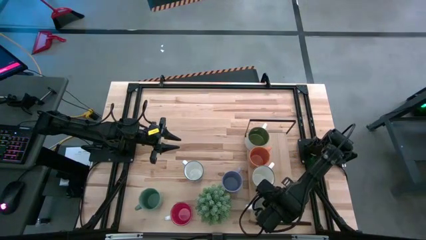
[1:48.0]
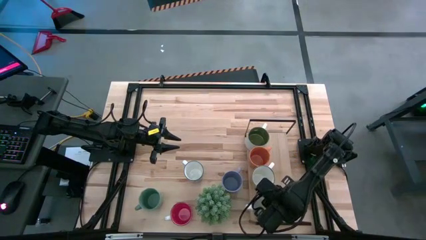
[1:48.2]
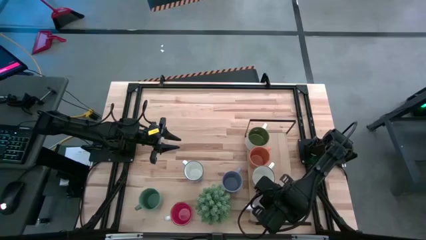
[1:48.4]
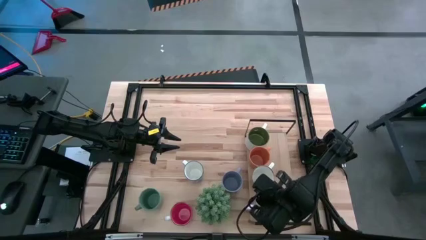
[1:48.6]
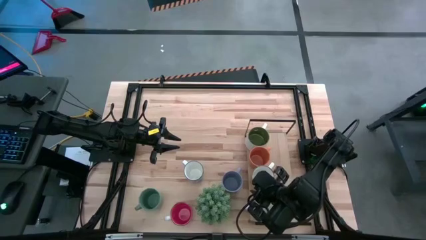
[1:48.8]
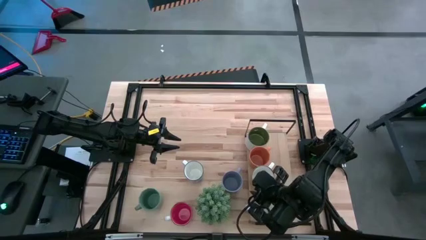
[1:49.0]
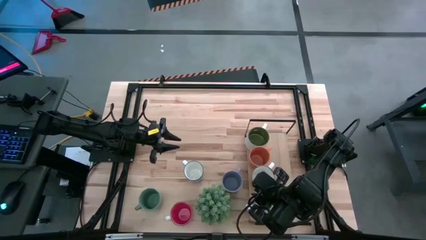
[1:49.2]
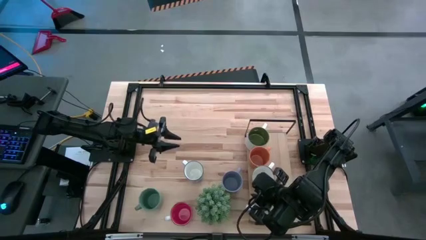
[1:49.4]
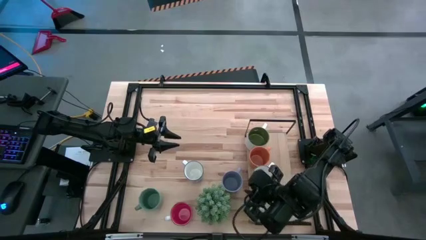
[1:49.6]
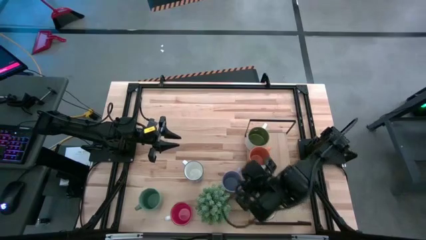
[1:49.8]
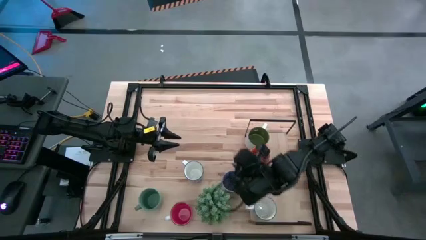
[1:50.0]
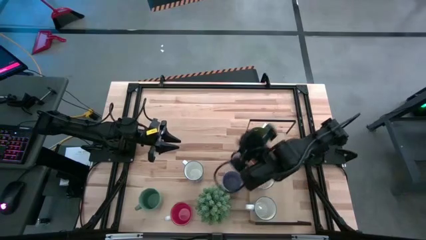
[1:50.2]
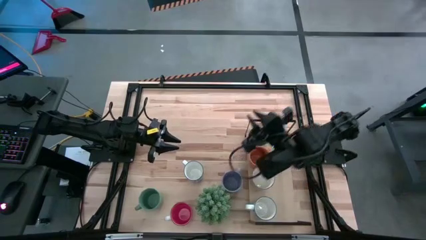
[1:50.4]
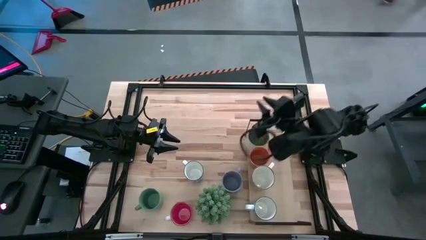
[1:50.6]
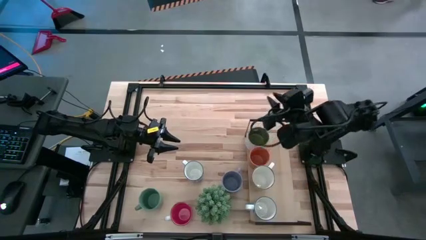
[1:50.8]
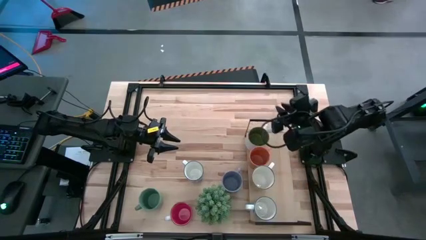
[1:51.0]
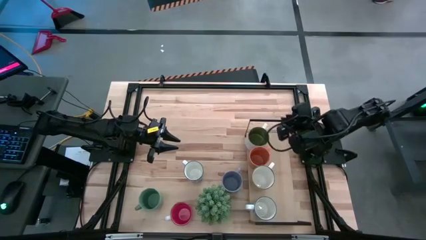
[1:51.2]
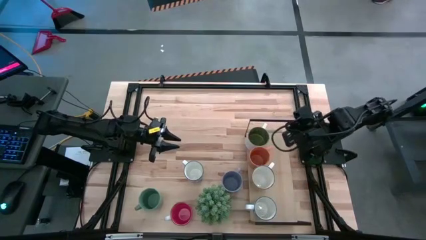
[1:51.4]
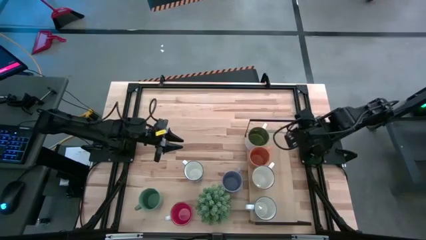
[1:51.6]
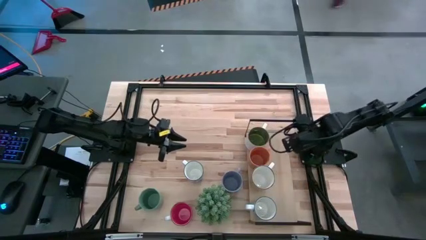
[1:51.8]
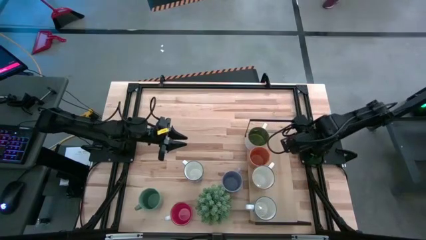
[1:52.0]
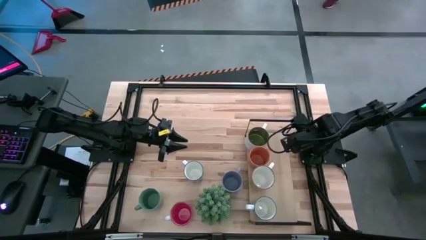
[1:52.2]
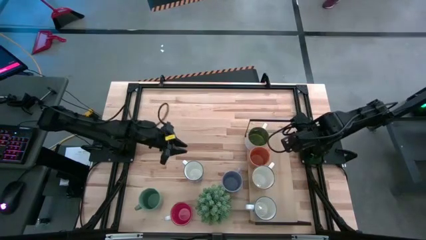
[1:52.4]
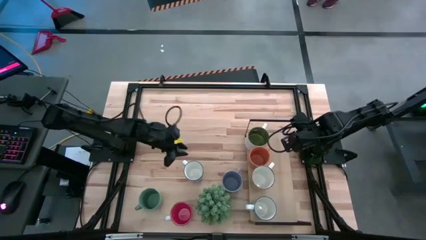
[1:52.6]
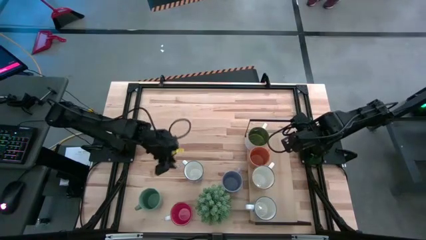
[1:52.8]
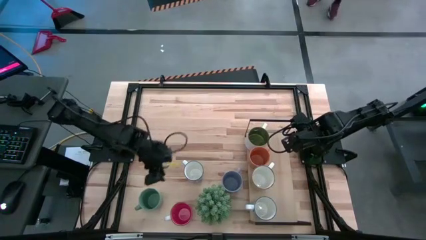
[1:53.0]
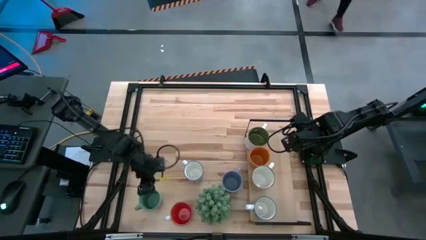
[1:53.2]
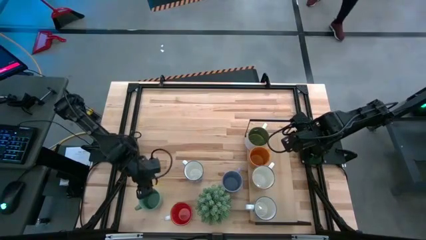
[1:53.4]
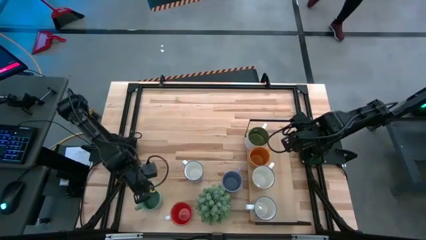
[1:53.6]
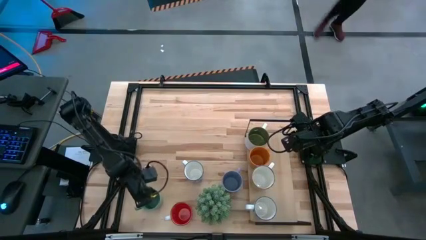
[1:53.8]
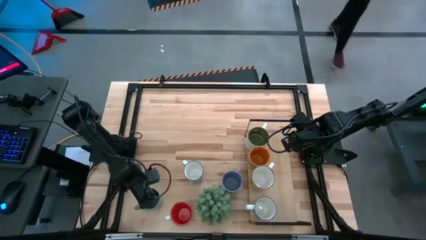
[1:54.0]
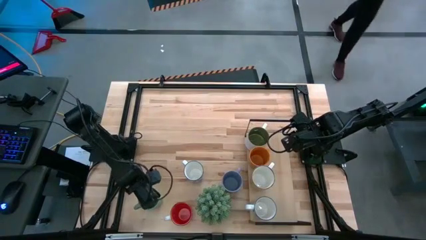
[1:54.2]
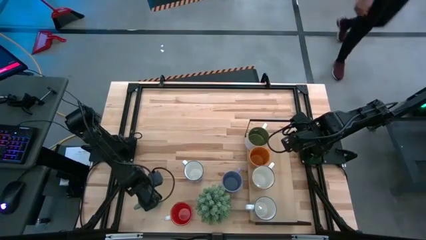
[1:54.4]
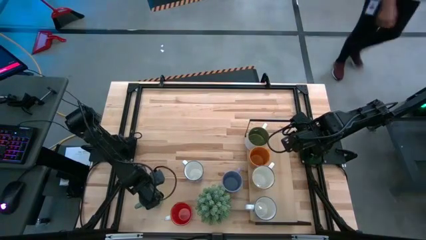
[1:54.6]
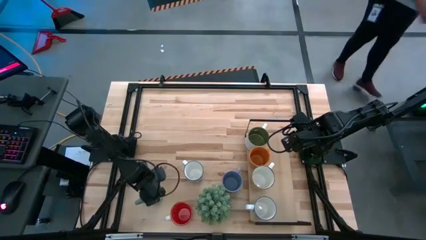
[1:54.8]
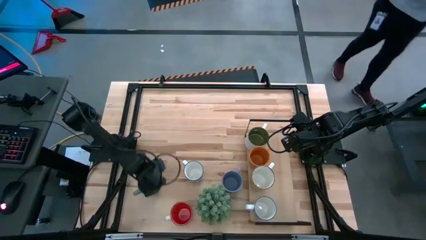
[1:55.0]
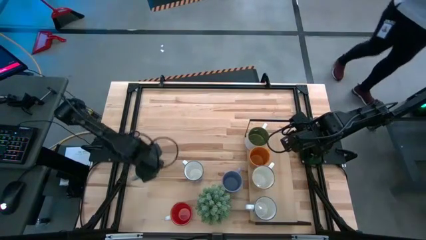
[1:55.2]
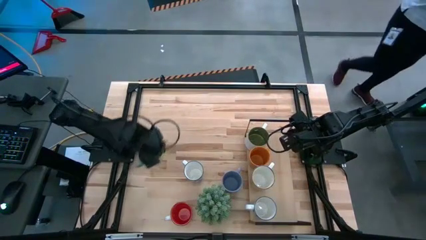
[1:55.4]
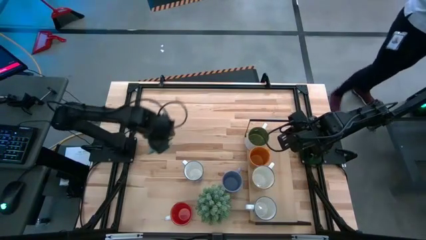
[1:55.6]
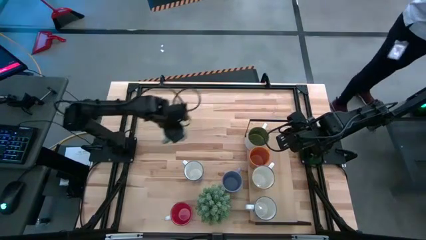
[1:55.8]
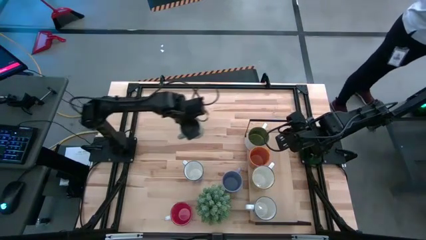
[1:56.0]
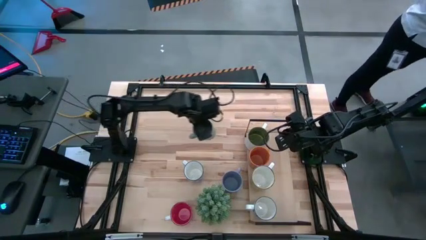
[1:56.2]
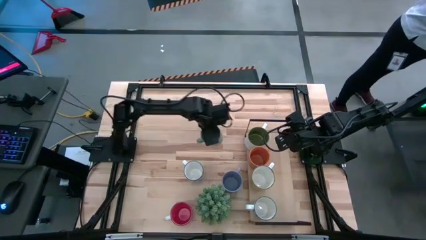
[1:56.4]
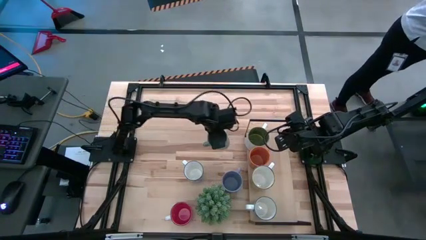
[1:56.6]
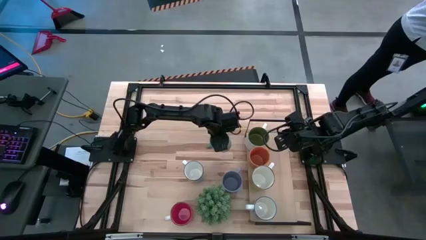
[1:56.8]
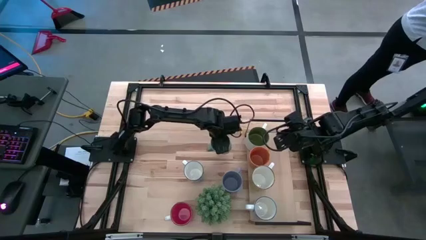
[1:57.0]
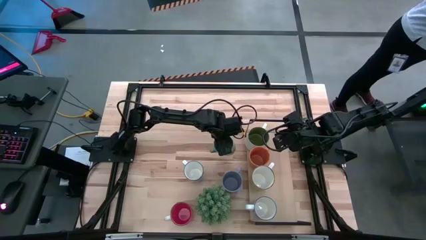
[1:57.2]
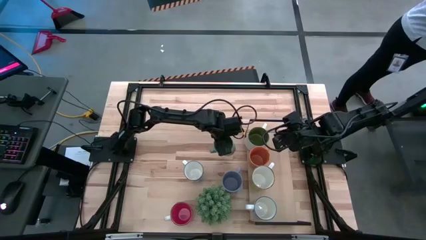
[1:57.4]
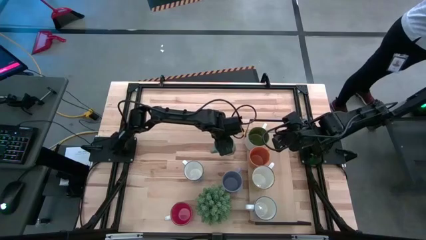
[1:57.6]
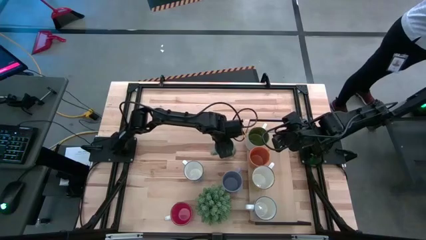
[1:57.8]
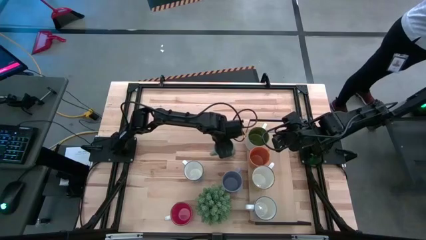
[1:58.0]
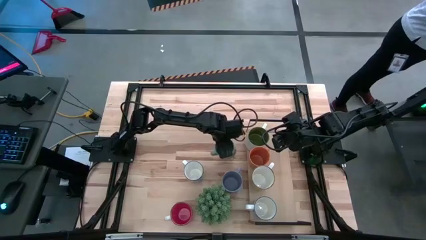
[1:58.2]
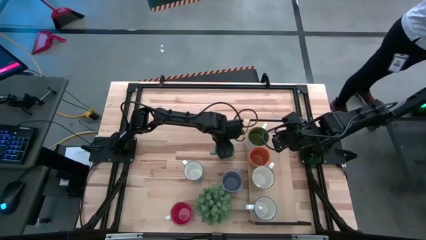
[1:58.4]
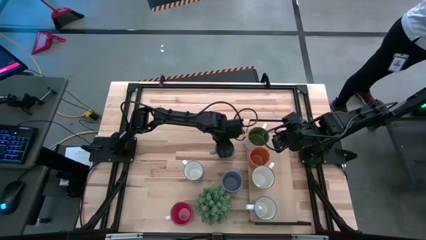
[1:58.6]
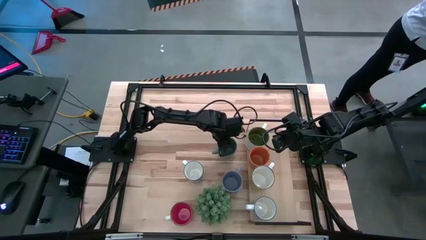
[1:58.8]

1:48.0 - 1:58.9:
Task: Place coffee mugs
Move the green mug to the center of the table

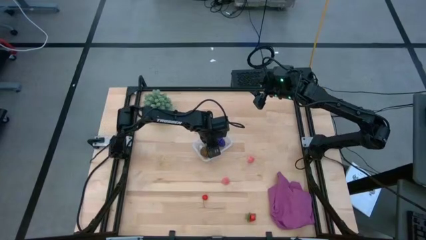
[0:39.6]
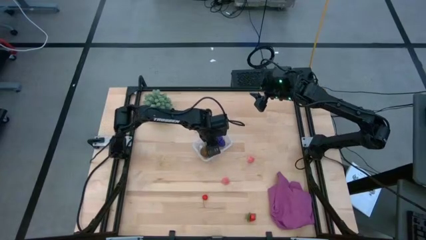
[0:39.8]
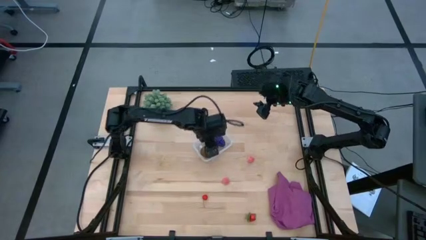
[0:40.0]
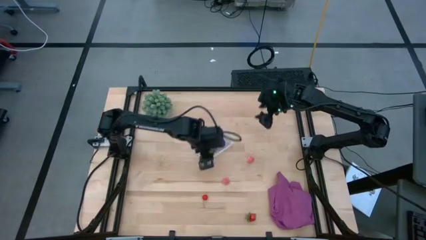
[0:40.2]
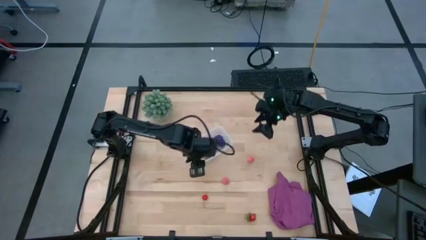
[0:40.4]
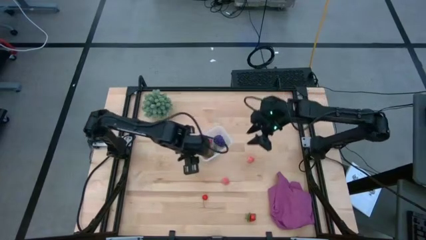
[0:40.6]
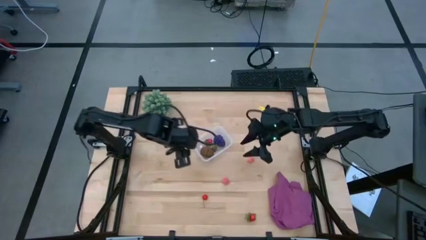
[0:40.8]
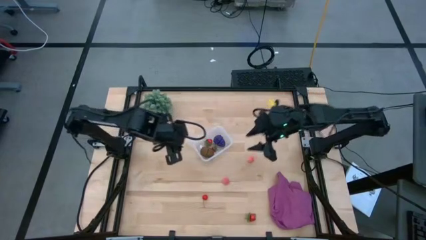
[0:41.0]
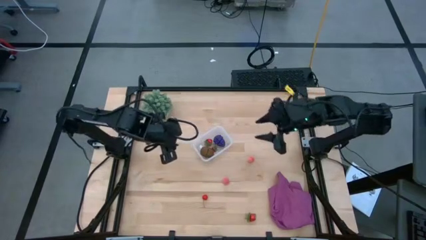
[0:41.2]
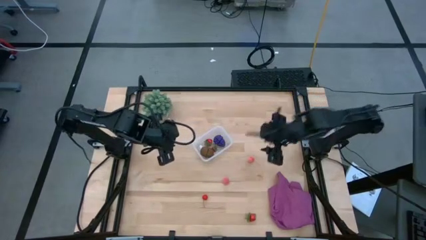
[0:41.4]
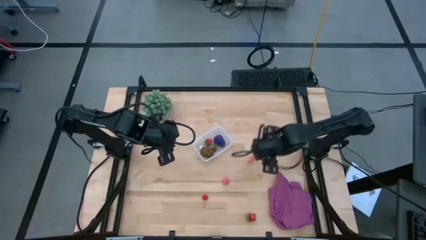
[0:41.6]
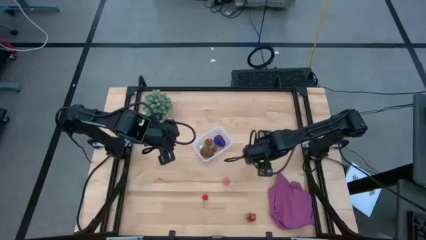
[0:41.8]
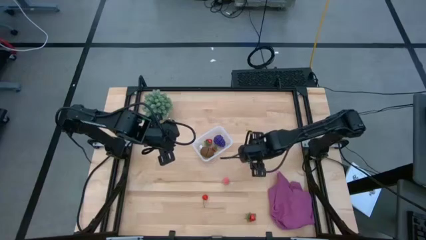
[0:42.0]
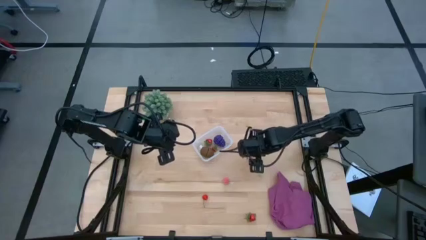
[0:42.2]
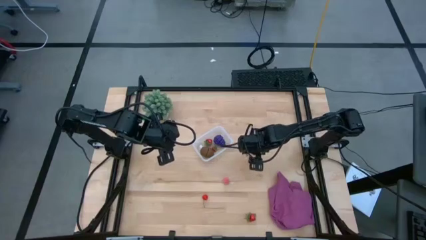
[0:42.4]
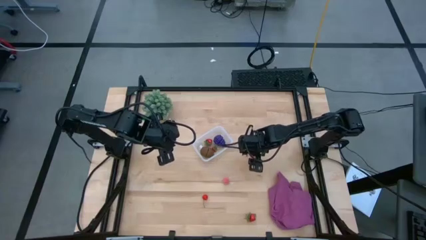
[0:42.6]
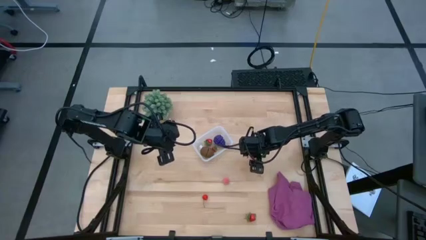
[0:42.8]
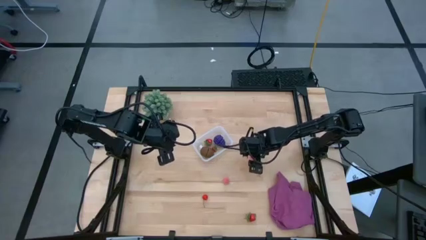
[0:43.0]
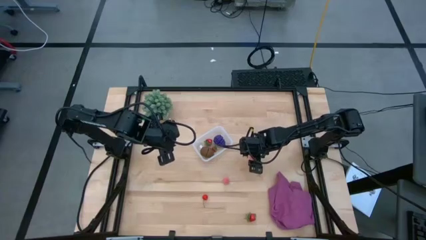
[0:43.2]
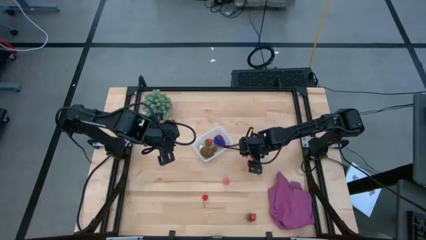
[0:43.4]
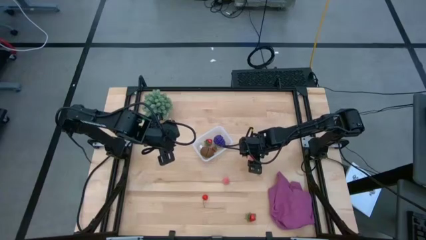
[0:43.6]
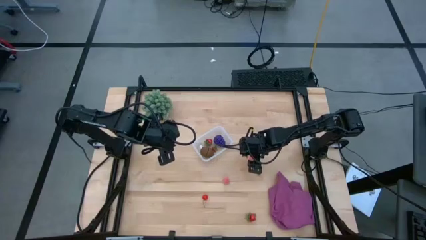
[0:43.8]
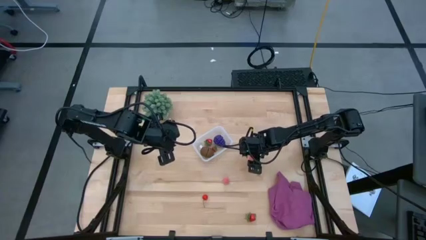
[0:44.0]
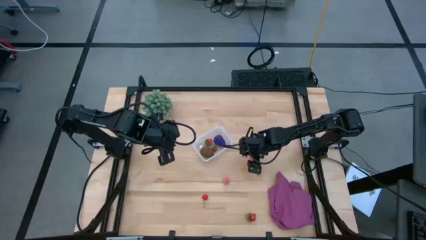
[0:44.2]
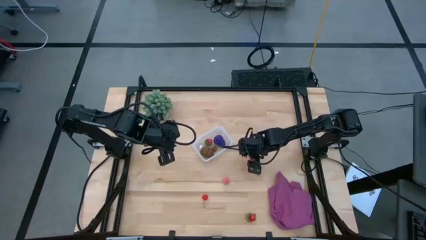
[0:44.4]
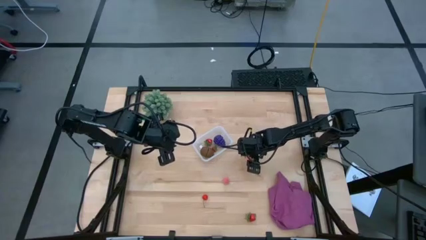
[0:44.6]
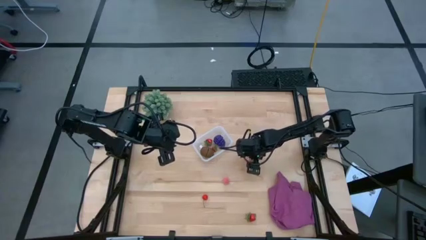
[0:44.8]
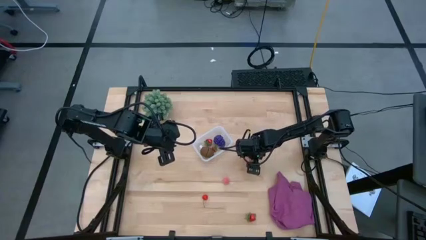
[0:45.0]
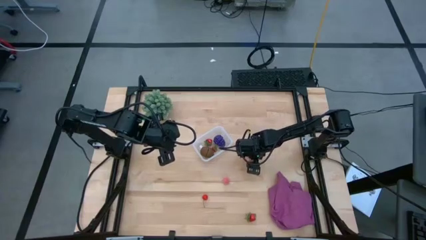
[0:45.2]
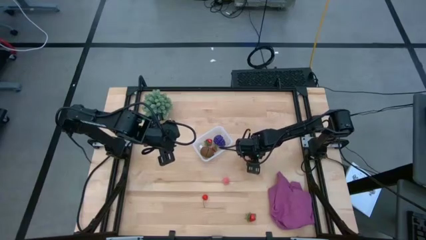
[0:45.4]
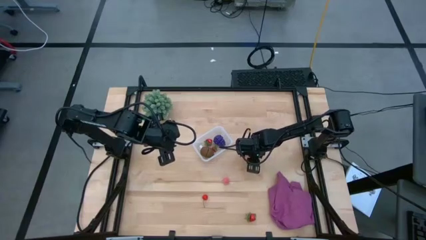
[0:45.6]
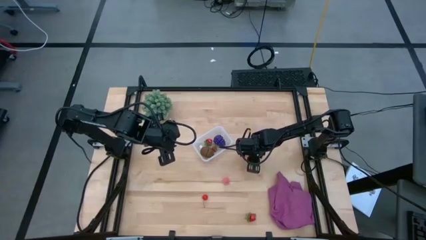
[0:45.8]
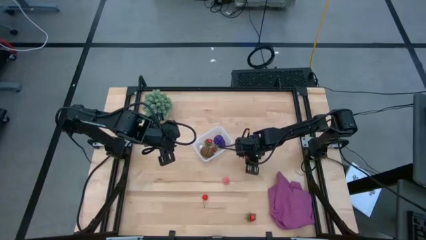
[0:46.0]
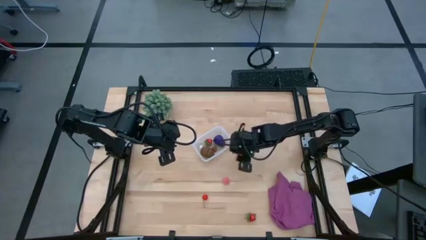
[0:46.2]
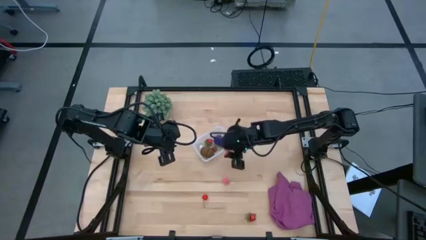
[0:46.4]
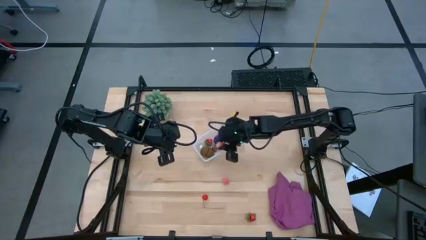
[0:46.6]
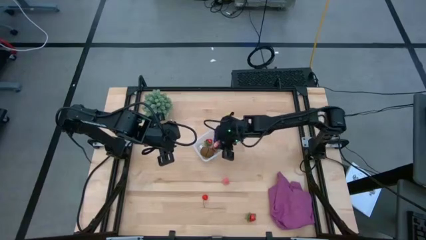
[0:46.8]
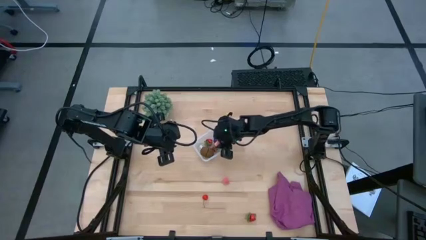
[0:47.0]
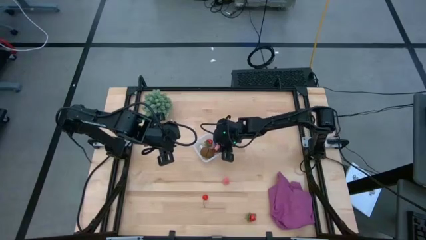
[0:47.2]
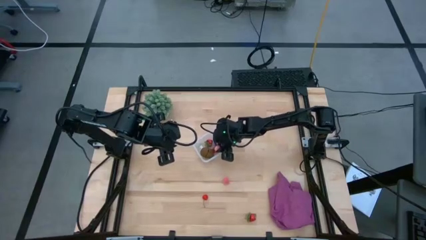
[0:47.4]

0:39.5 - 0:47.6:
Task: Pick and placing Produce into tupperware
Put the top peach into the transparent bin
